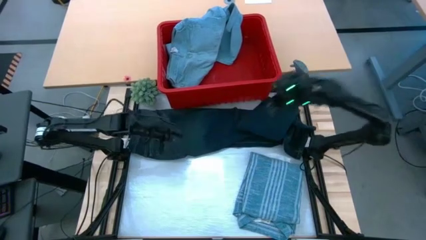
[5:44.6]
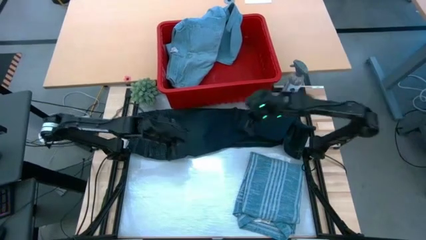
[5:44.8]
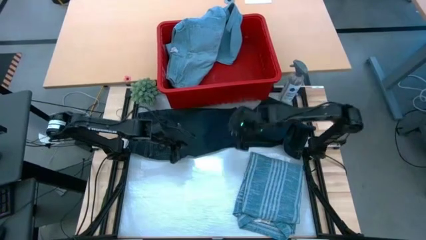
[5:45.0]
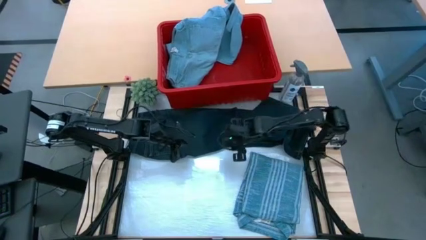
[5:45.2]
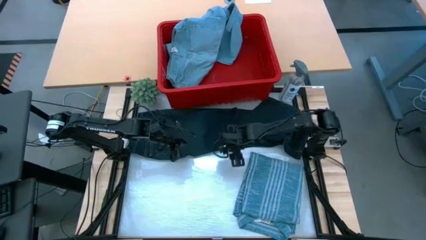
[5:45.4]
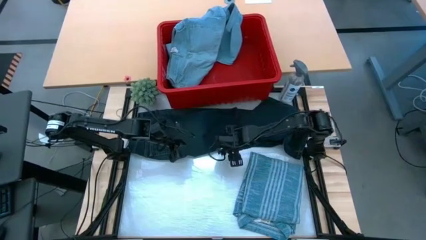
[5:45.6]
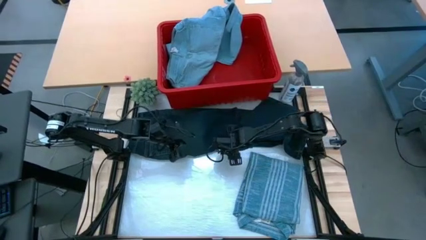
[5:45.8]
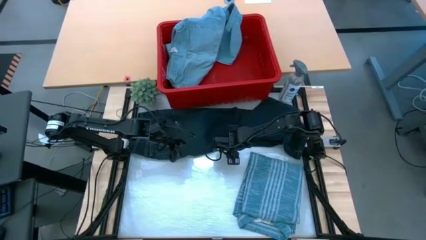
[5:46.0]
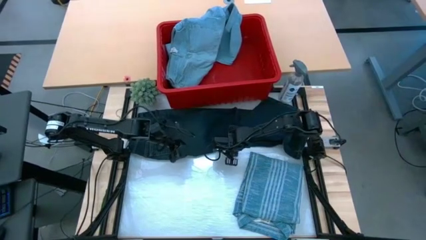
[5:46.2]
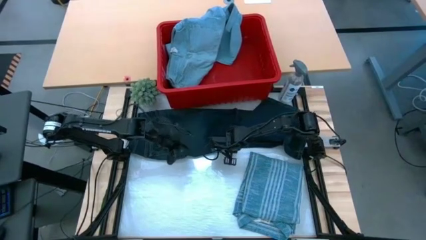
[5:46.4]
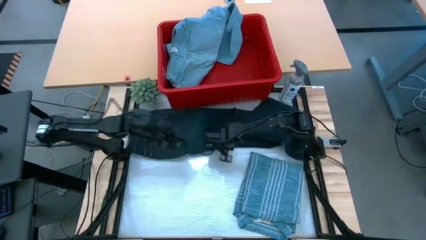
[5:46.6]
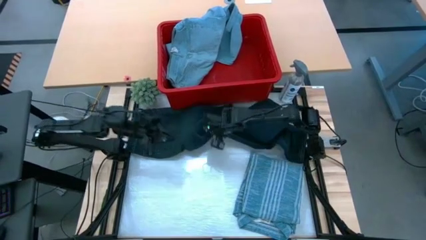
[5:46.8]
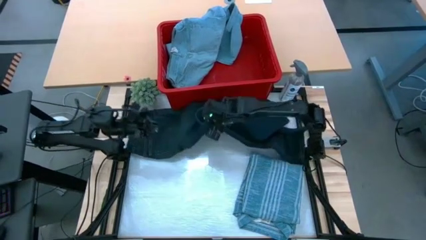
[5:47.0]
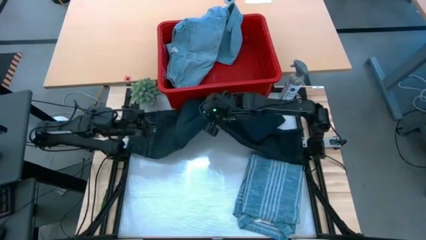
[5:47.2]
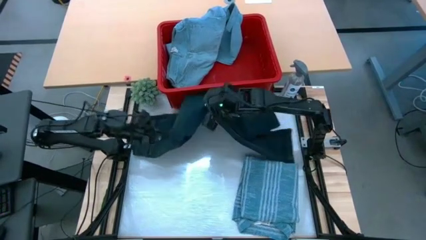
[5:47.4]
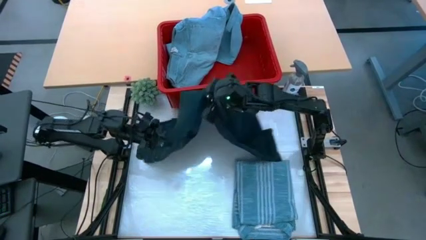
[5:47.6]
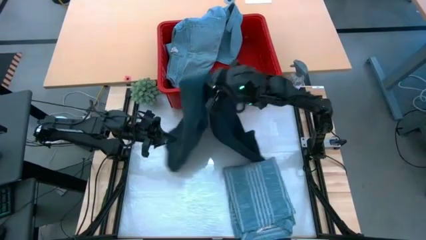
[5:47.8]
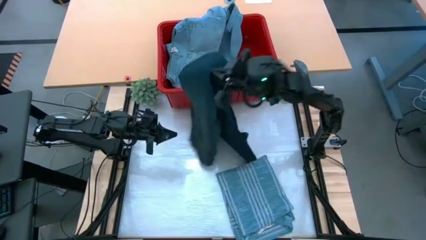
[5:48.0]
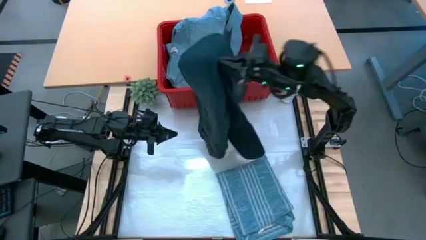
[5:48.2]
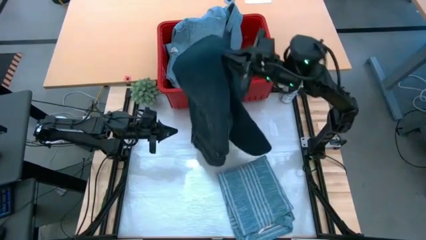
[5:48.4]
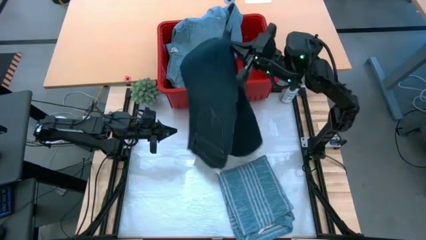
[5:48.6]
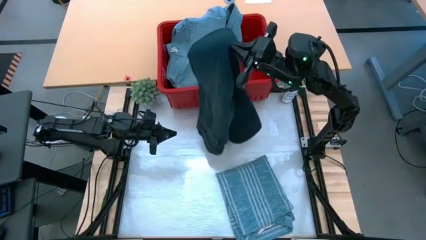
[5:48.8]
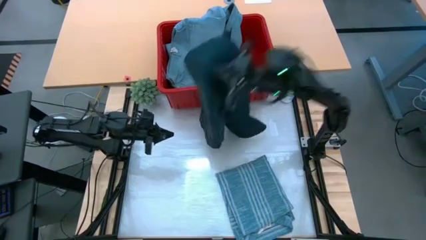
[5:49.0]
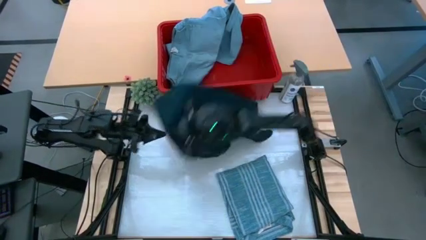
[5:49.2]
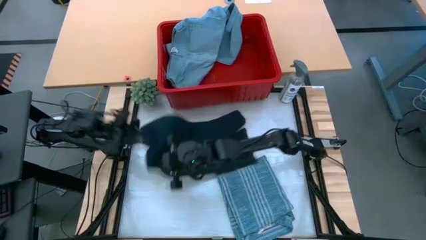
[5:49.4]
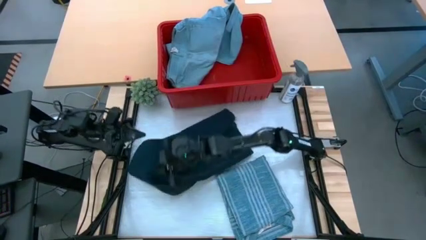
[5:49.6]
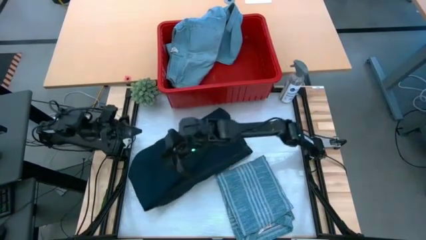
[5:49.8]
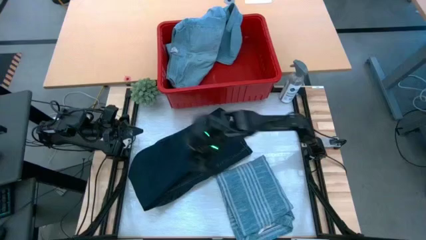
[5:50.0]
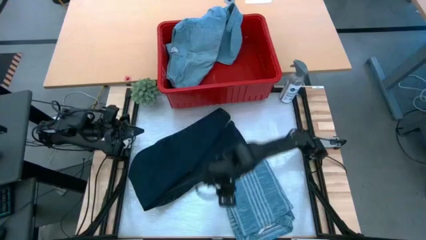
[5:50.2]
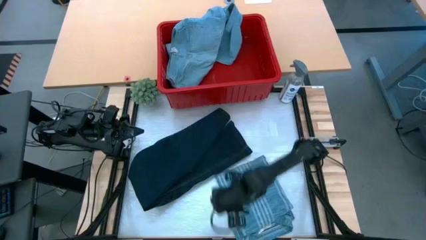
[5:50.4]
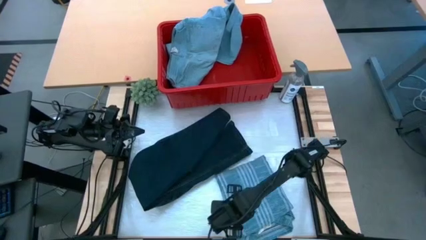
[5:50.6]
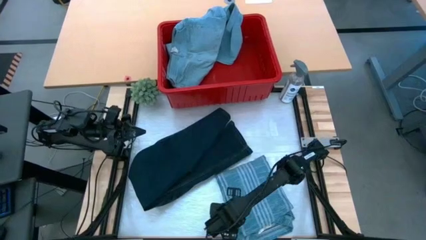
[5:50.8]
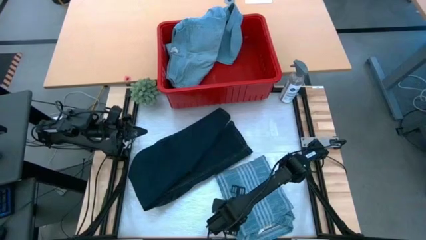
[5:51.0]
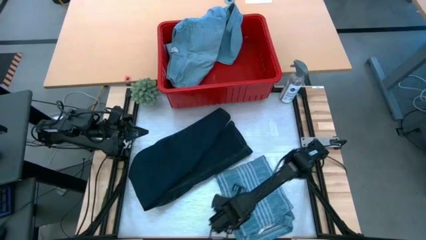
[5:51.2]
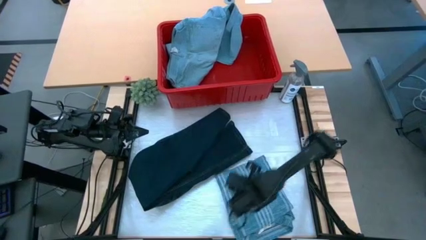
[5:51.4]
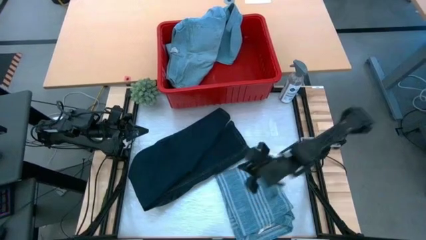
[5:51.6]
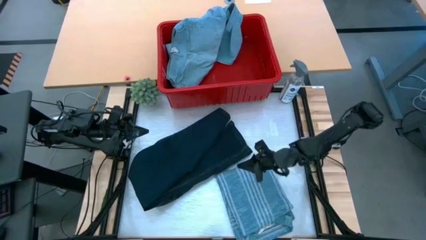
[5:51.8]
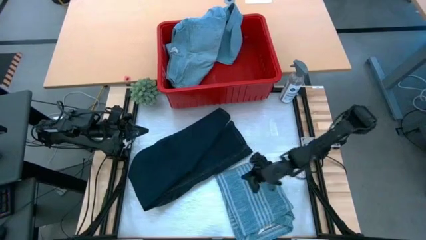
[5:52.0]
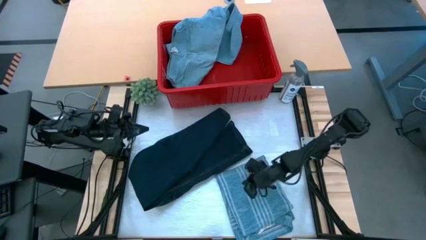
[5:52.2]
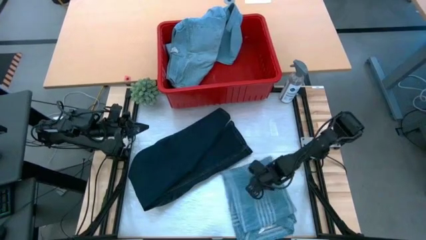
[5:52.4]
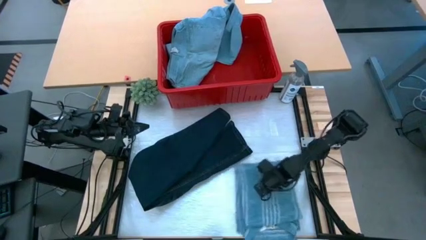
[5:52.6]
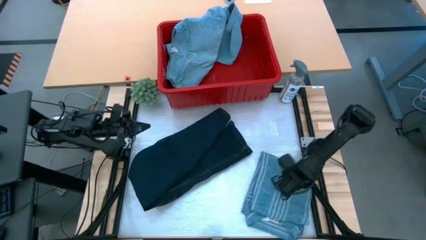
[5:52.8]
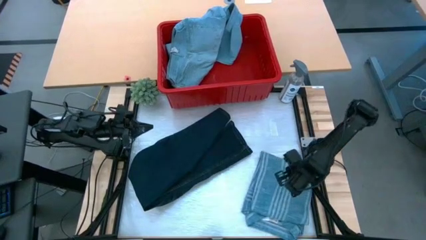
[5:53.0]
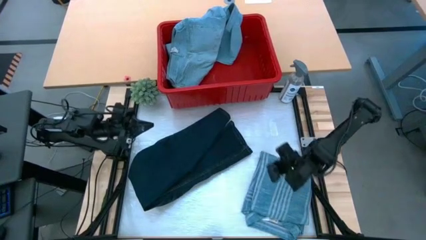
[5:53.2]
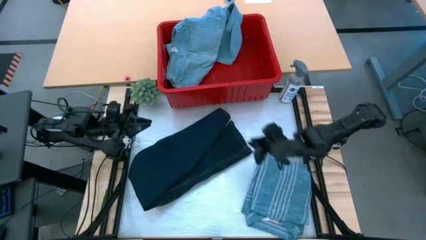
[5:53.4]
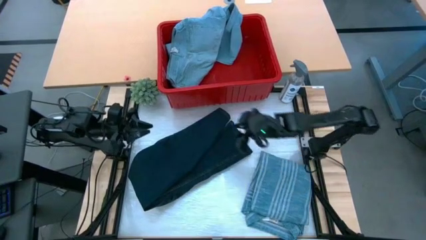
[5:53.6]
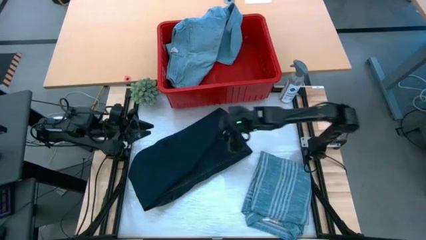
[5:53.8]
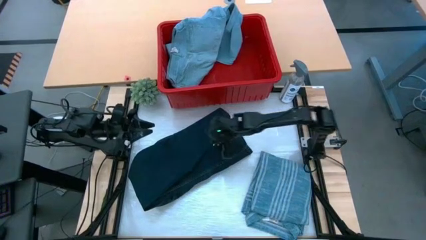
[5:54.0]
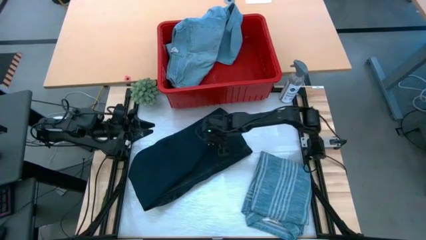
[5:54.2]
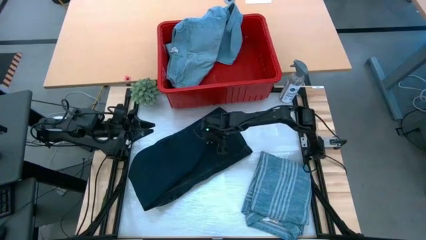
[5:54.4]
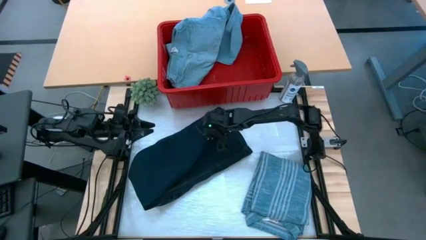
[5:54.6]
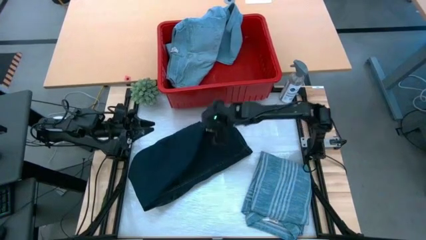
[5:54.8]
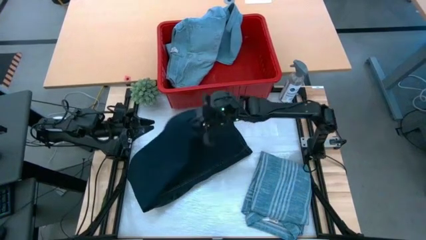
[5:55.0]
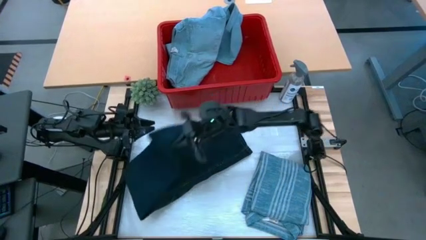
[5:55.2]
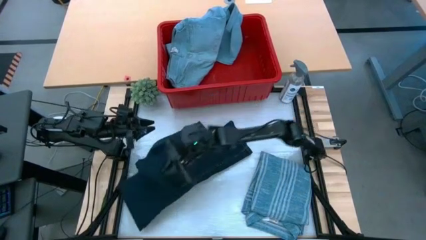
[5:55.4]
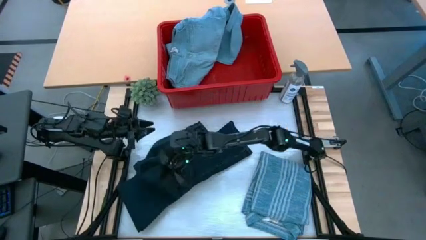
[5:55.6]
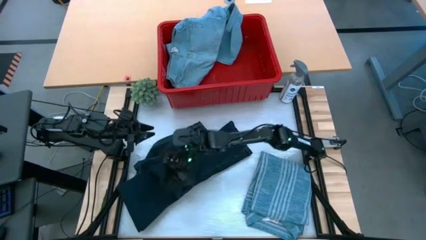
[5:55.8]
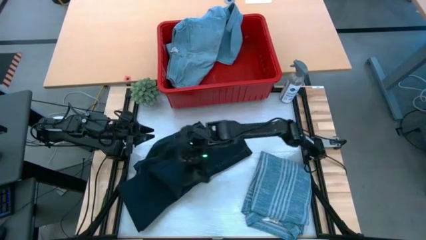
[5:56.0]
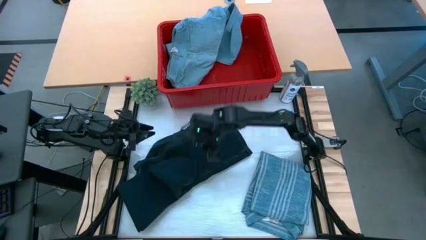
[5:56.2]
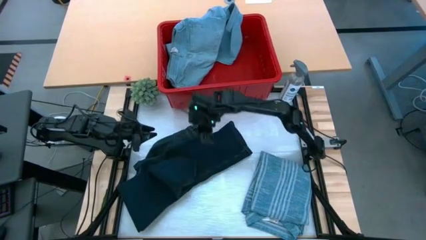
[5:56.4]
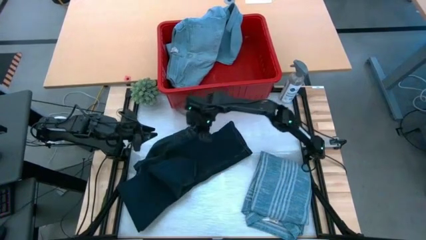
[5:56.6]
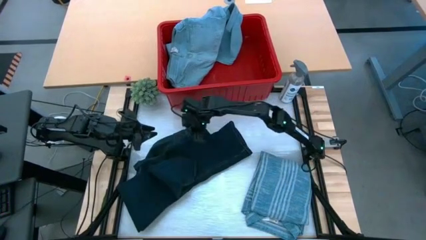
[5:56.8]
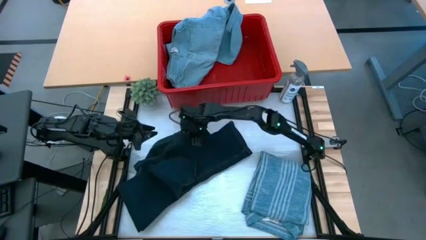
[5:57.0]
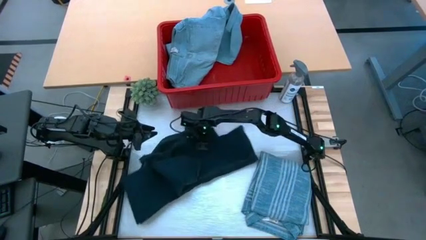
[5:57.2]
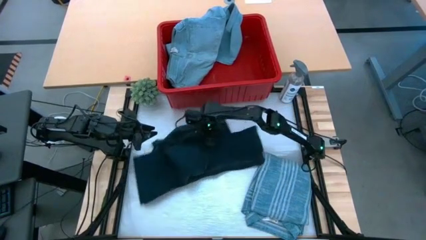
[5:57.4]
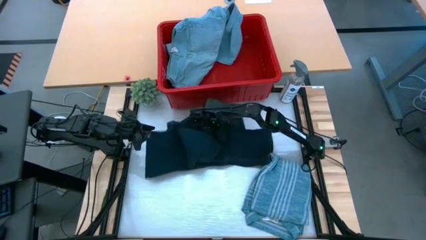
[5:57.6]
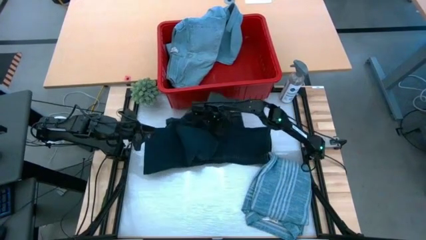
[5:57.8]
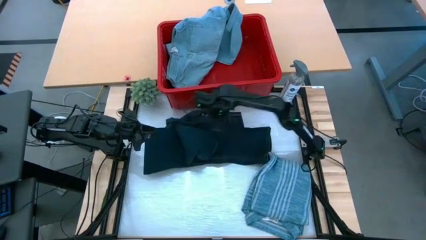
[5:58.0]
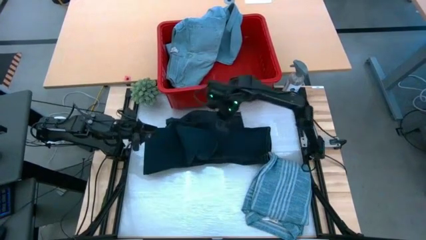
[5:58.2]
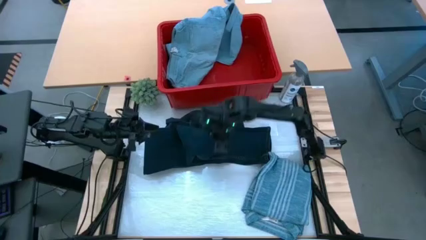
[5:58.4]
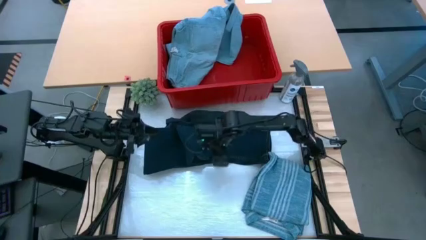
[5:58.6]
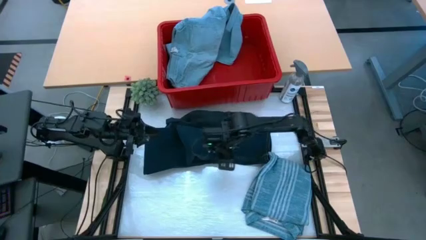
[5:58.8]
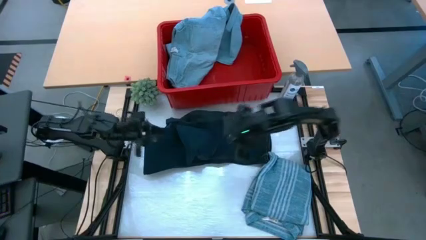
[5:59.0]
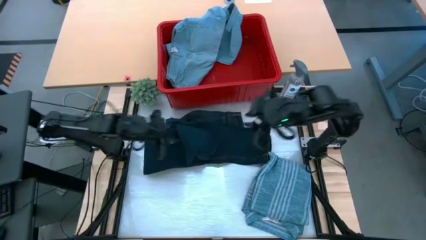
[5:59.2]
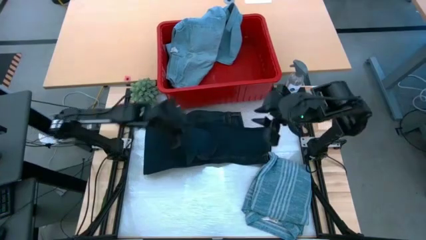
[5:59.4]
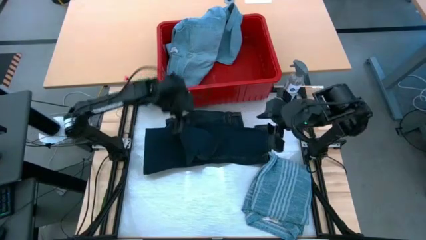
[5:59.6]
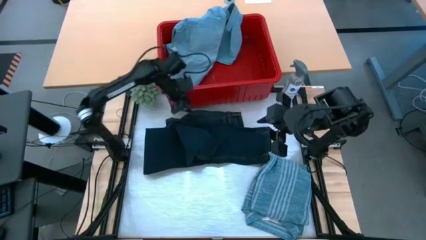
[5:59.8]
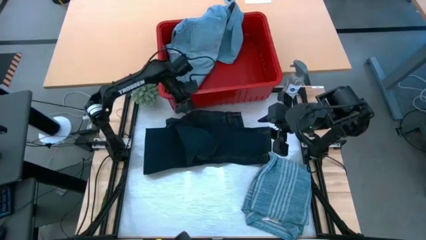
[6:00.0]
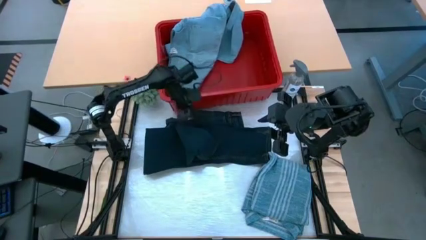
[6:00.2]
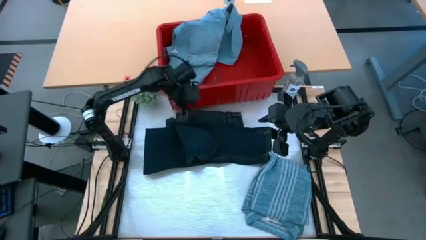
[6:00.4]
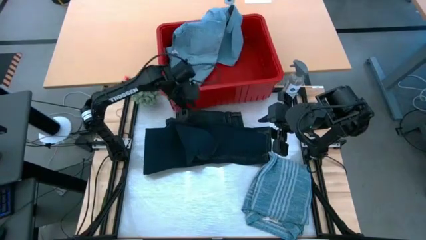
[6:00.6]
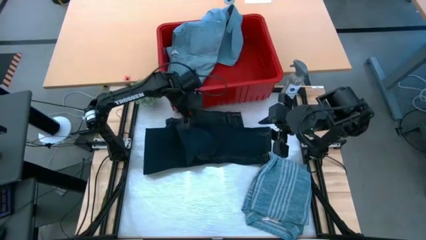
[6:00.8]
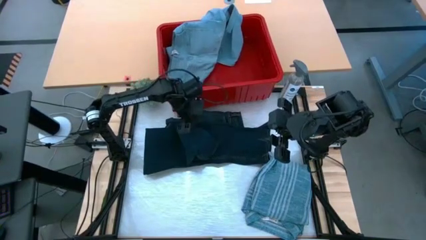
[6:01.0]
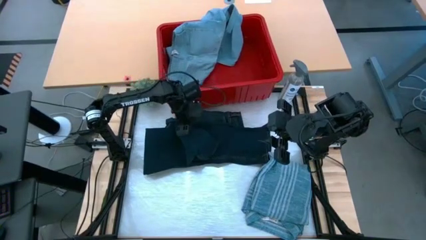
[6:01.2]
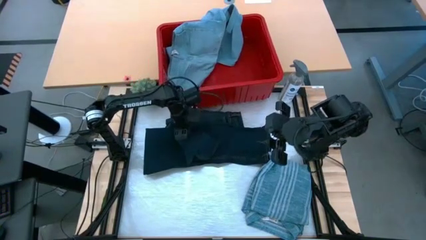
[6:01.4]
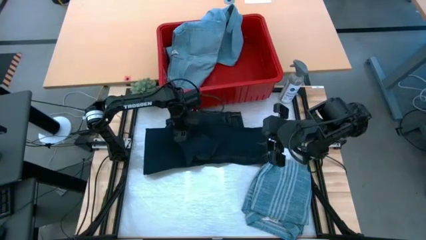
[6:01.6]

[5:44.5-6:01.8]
Task: Fold Laundry from Bin
Fold the blue denim pants
